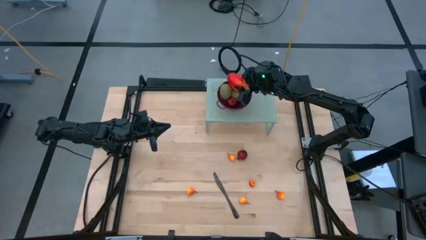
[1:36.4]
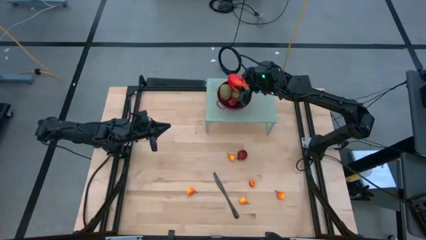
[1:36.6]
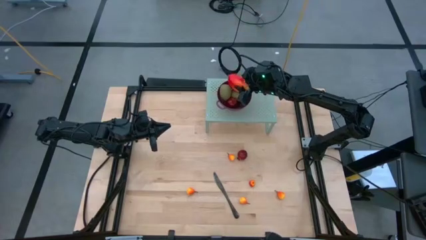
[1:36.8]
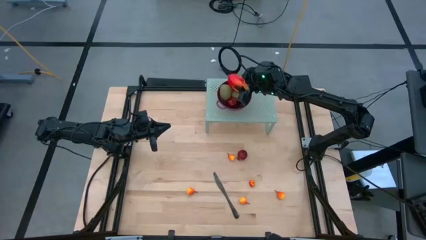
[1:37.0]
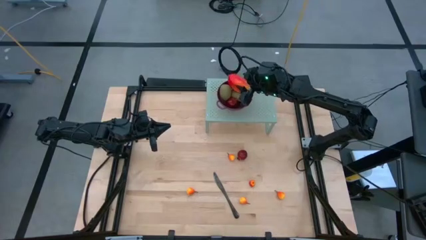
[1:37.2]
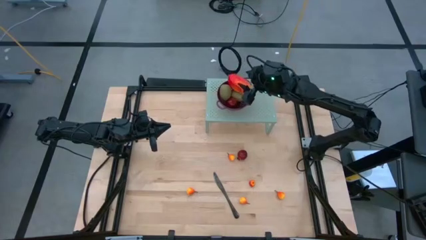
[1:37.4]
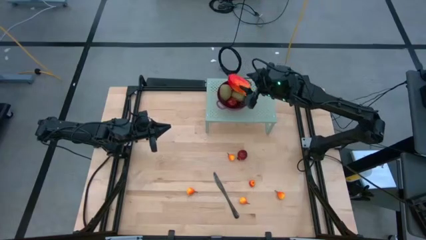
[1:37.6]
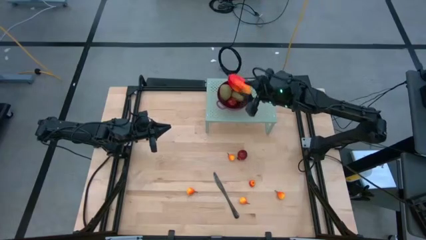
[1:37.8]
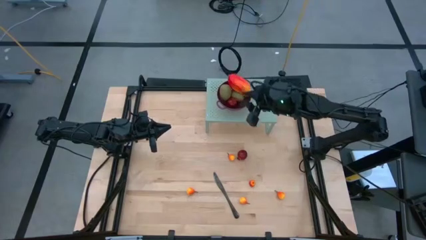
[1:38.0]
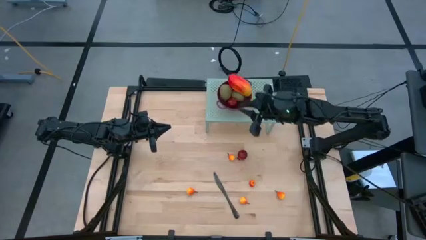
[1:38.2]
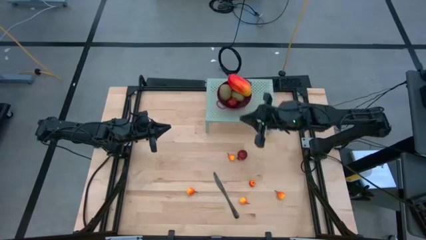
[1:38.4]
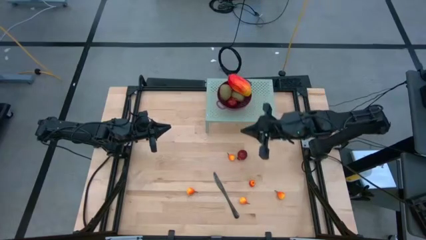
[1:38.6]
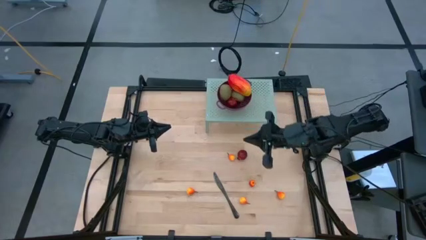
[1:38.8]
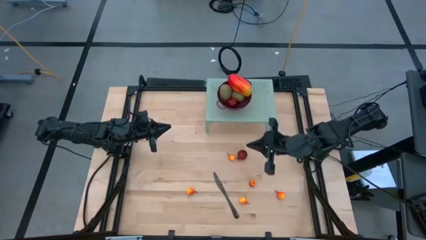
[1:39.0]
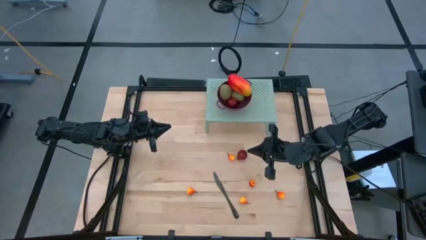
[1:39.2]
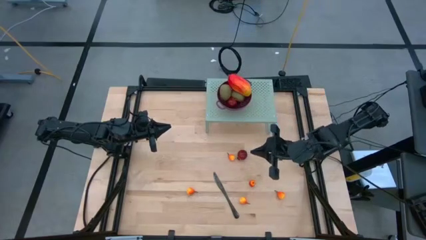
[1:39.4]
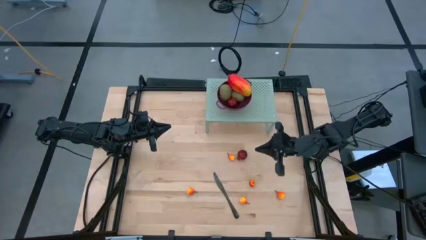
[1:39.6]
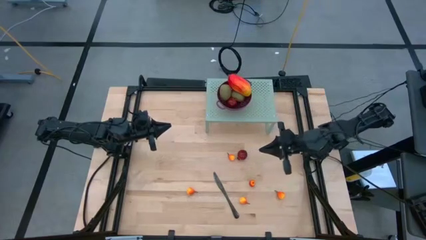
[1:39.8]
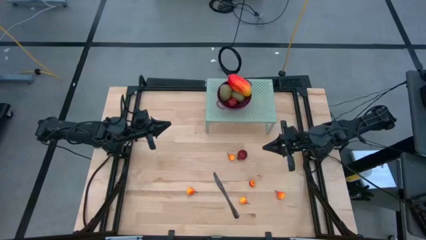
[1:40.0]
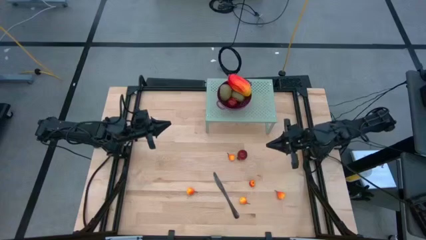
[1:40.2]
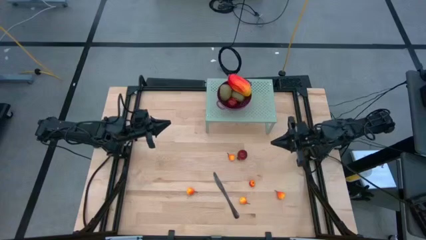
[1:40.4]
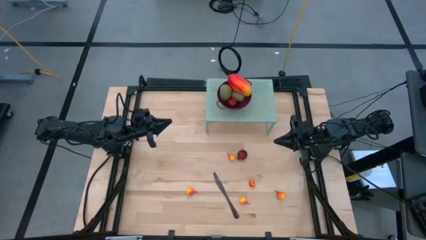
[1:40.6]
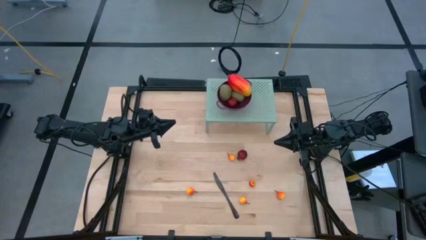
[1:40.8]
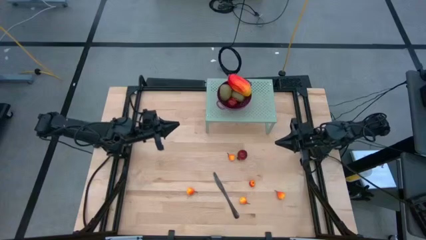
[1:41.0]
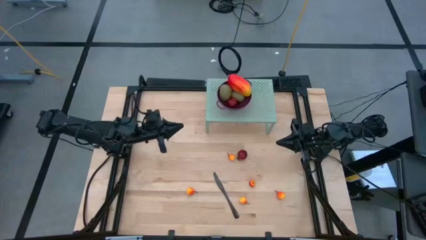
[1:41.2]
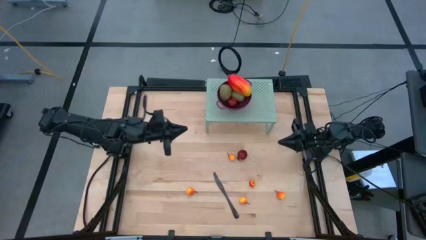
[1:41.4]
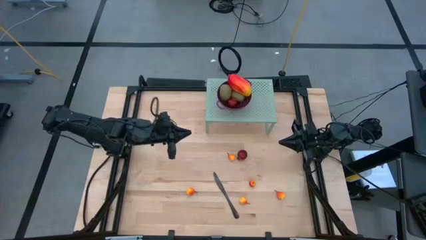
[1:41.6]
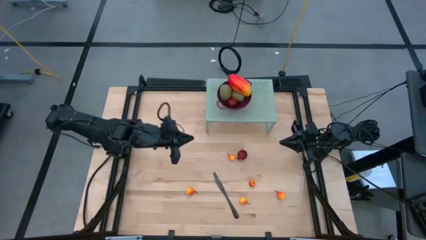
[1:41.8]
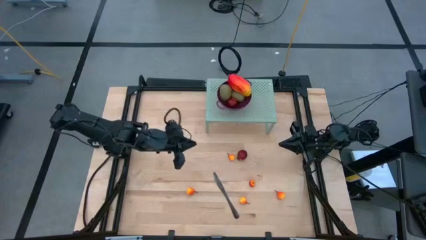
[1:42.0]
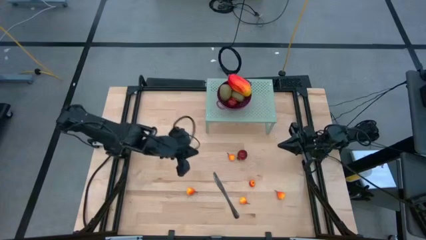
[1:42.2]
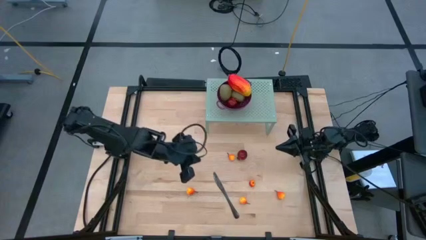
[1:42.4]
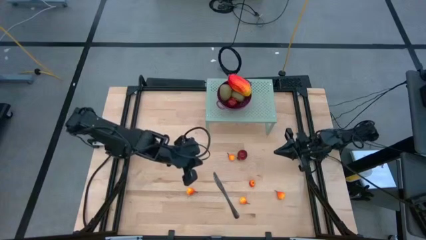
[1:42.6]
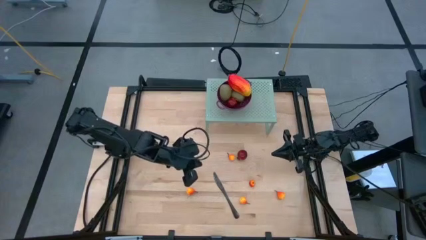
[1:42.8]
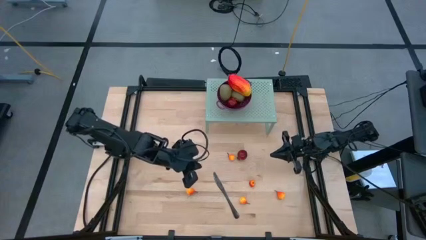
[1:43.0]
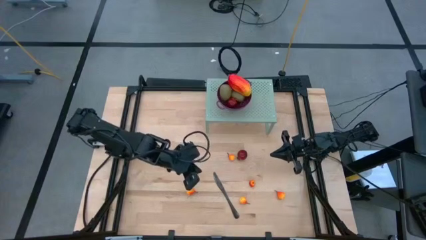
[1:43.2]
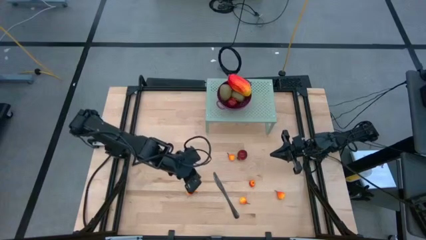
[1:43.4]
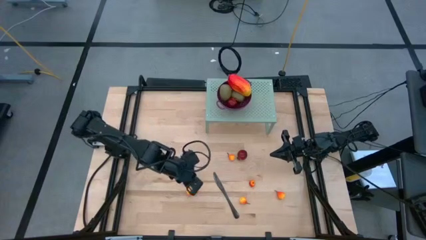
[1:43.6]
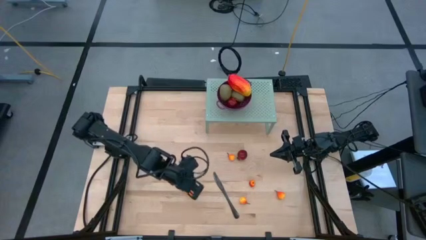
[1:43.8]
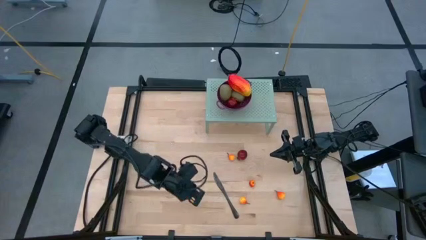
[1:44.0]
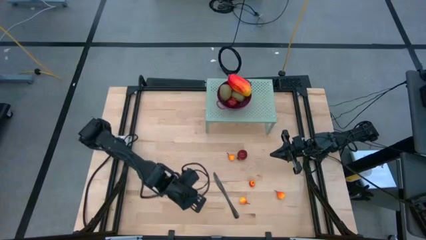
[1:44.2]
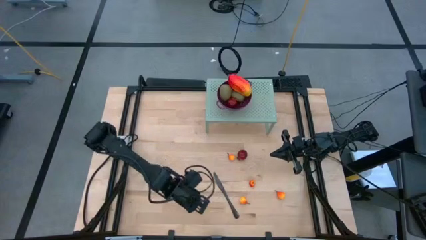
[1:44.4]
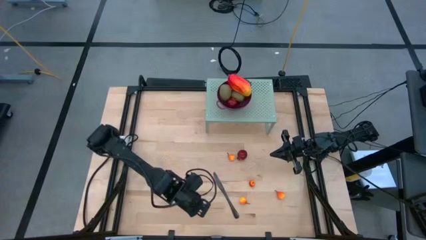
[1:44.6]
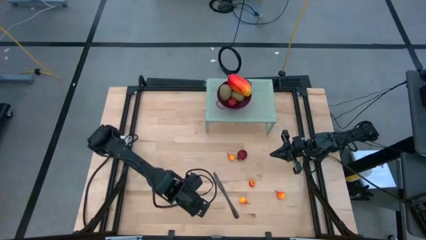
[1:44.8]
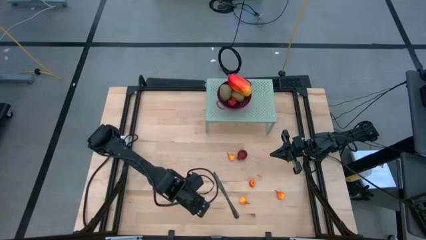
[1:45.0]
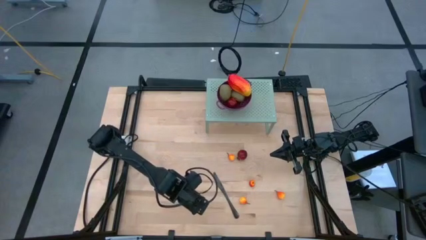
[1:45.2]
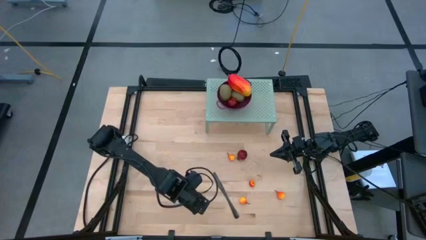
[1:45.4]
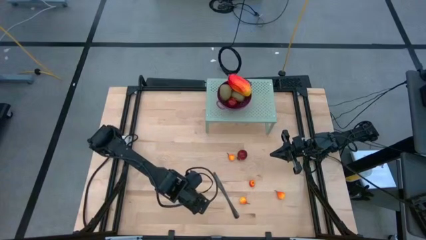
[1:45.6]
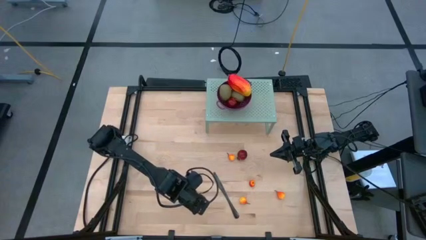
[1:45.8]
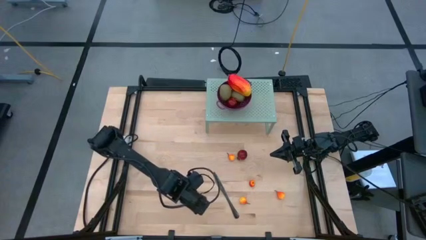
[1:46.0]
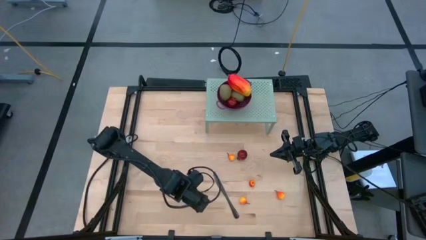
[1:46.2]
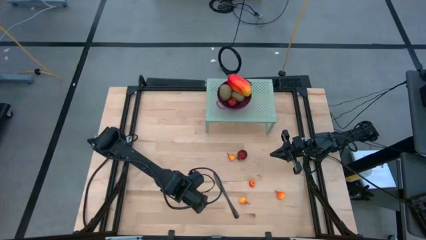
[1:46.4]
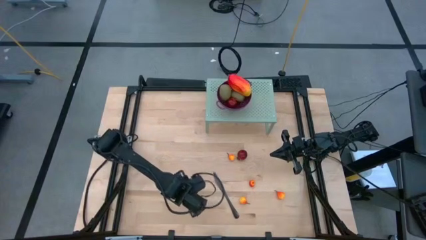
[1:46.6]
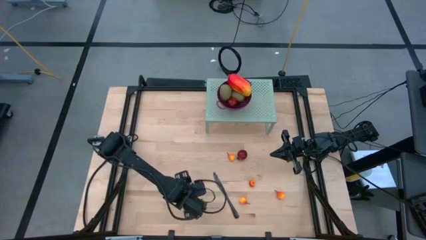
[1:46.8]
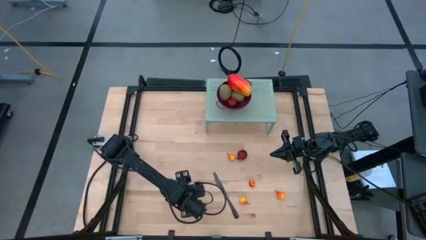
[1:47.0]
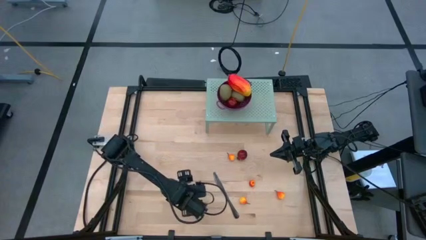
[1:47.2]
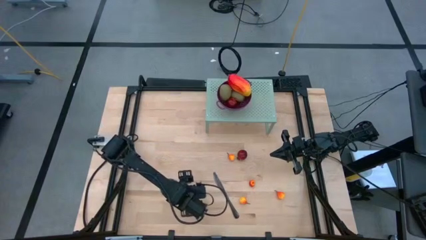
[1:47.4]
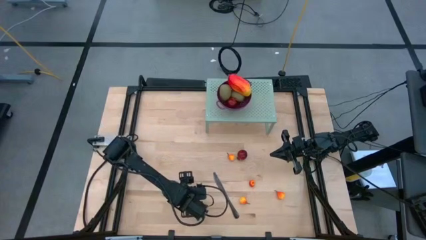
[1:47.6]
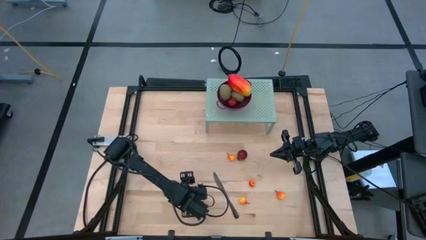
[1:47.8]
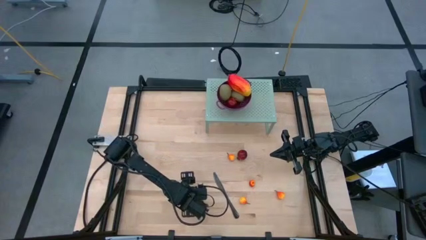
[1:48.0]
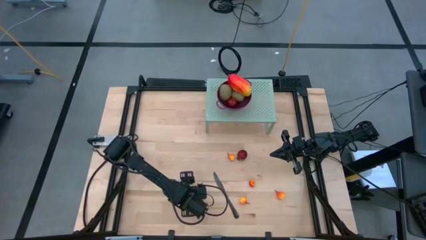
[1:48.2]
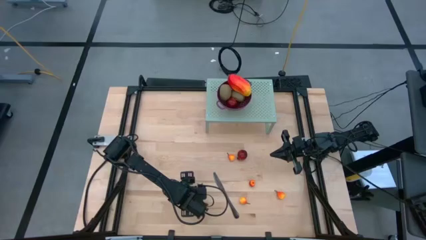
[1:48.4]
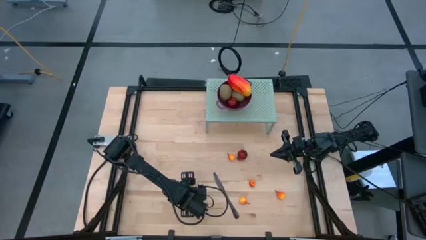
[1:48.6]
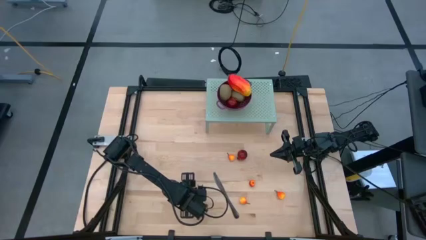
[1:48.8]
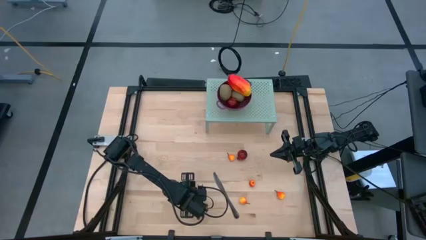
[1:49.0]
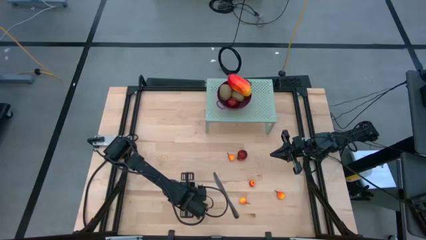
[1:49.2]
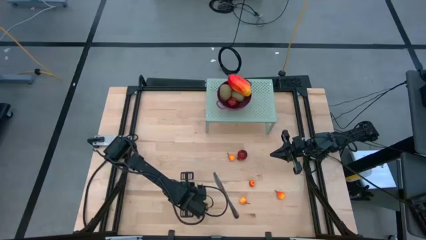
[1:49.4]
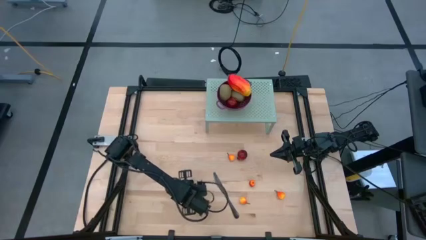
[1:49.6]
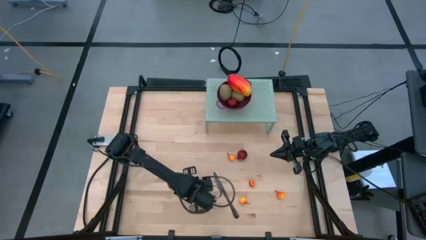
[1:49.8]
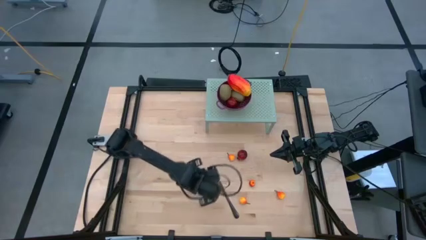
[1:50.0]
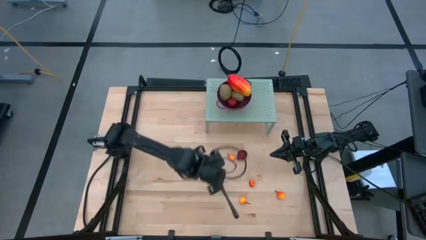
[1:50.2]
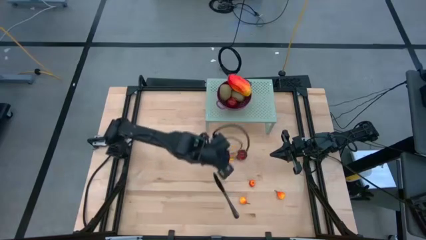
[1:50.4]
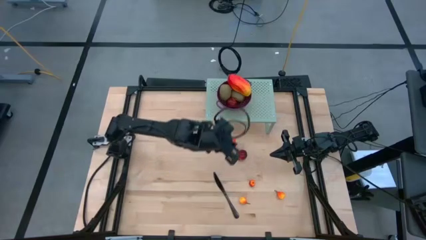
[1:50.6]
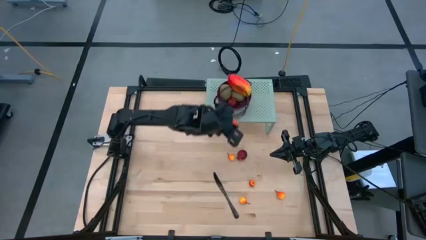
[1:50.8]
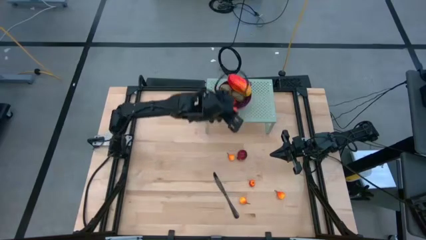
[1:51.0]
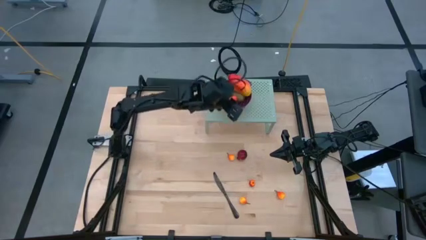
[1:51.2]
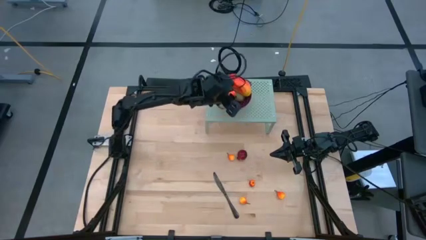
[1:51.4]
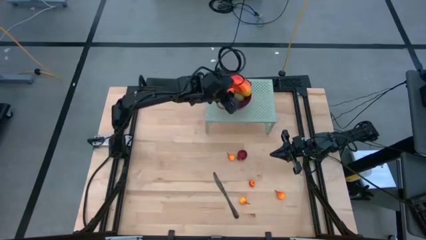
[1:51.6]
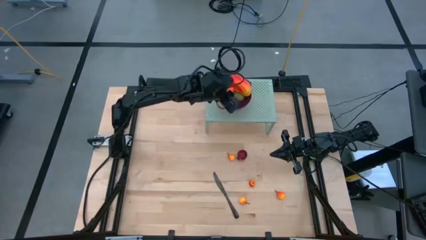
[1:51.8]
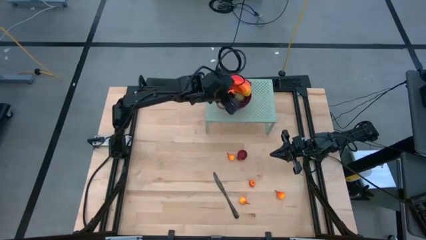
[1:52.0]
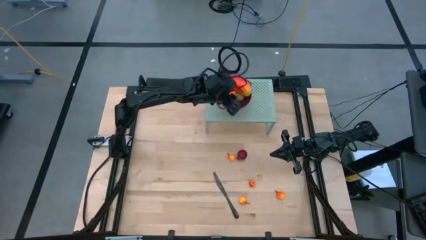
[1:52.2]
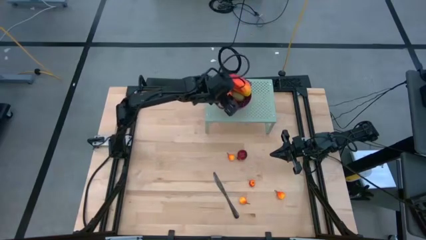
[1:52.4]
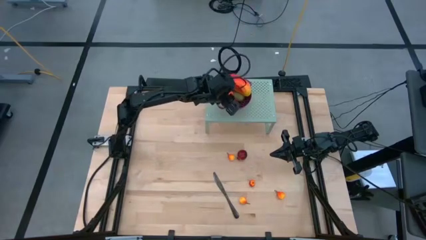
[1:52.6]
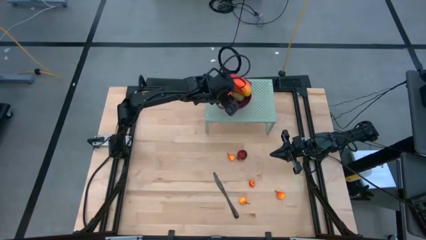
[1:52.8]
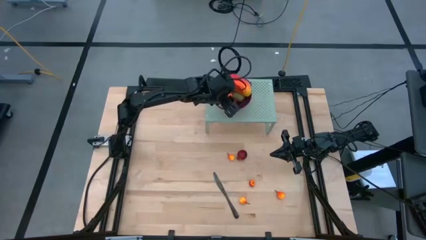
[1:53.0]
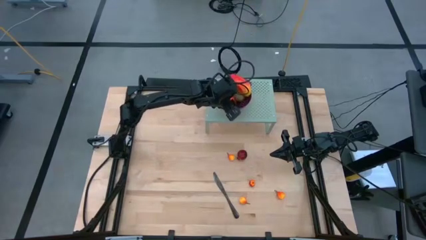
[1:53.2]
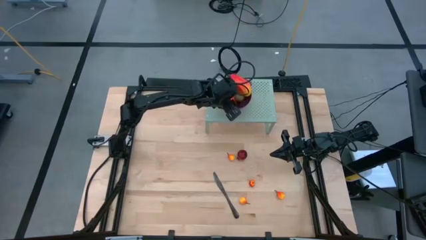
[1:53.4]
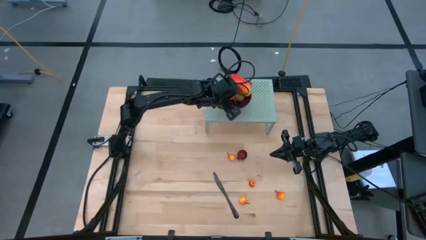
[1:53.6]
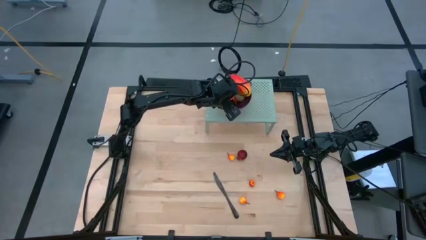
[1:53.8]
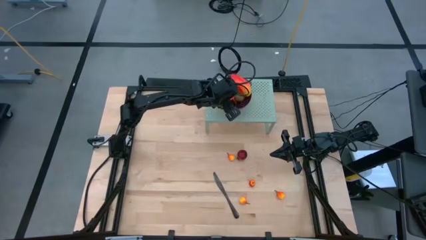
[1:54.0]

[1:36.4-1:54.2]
Task: Pick & Place Fruit
Put the orange pear into the violet strainer bowl on the shelf
